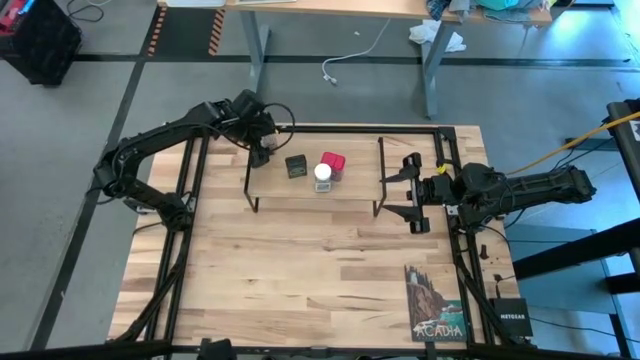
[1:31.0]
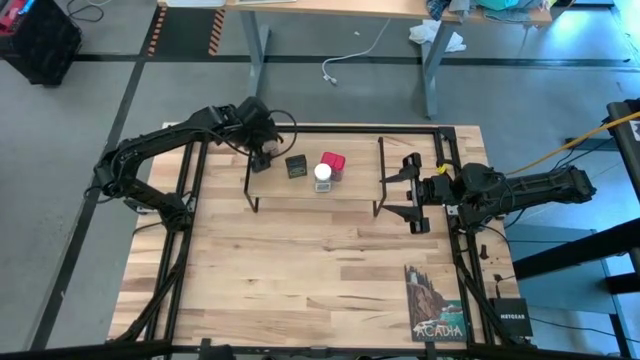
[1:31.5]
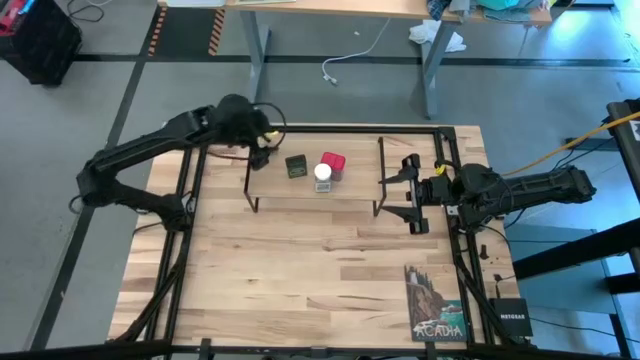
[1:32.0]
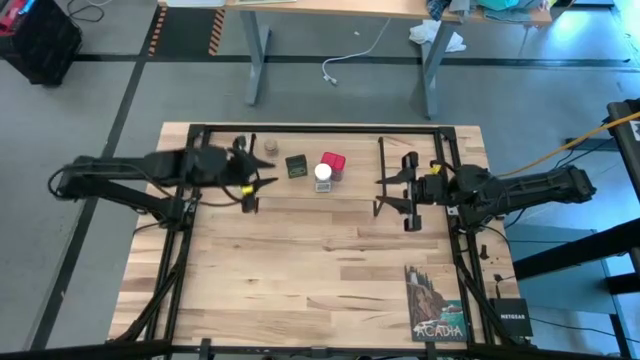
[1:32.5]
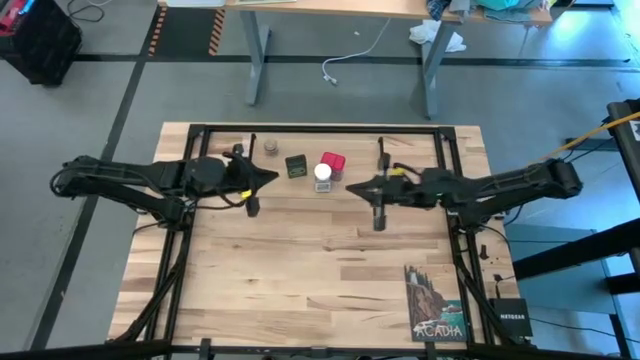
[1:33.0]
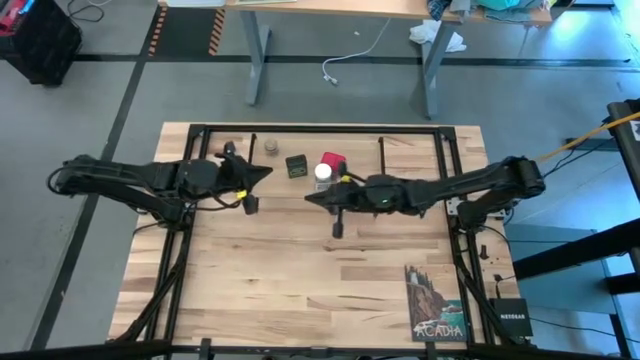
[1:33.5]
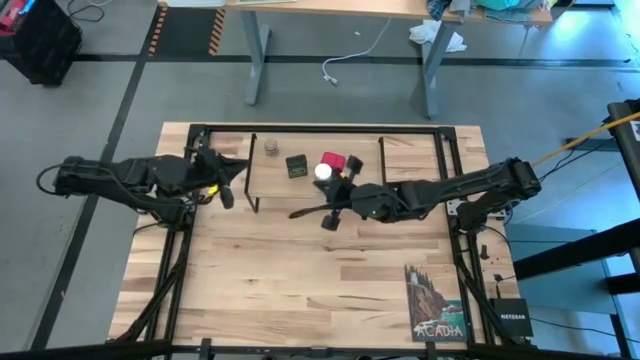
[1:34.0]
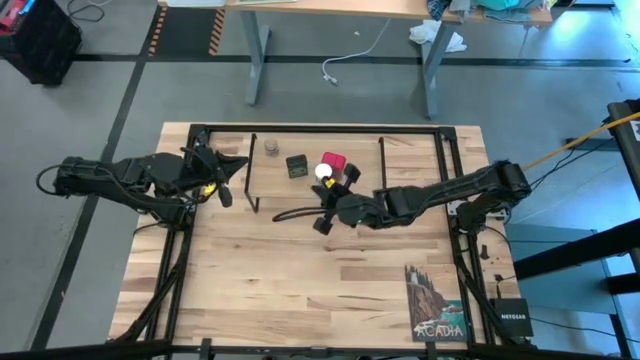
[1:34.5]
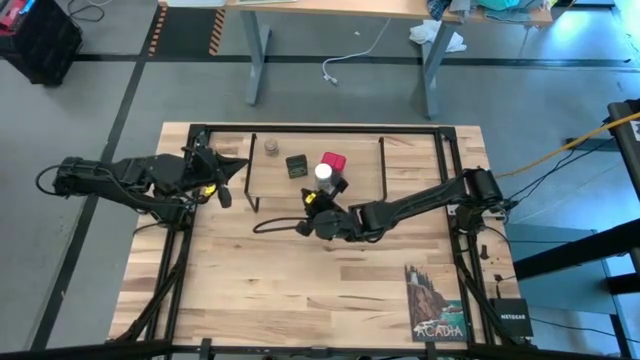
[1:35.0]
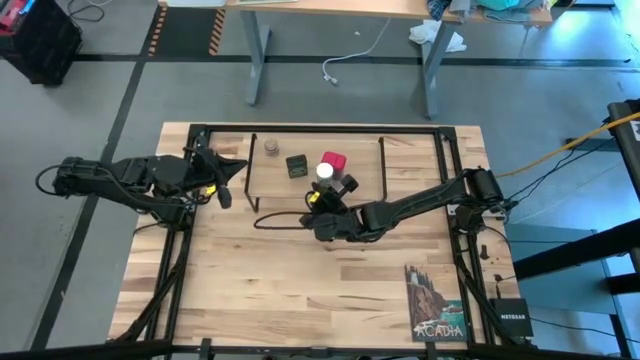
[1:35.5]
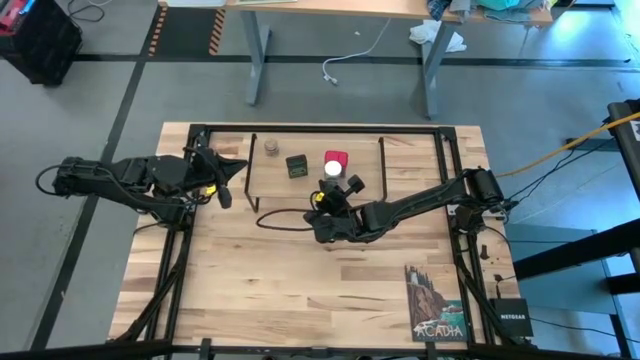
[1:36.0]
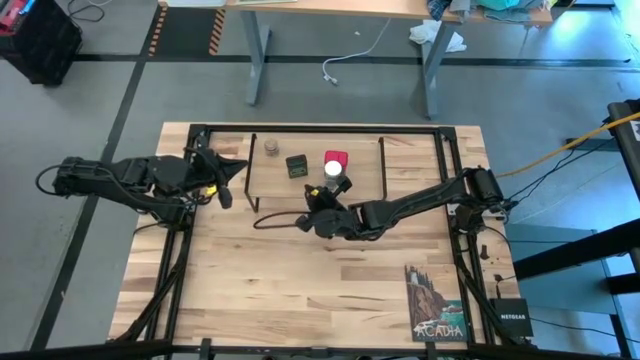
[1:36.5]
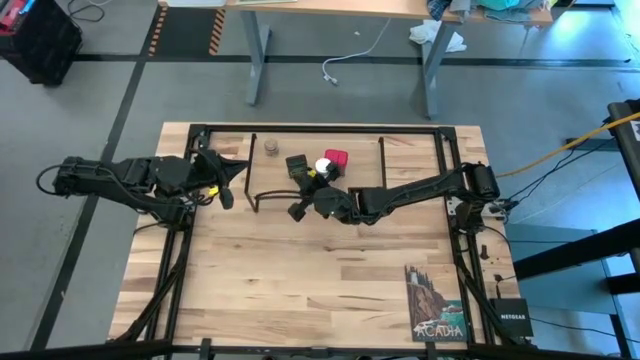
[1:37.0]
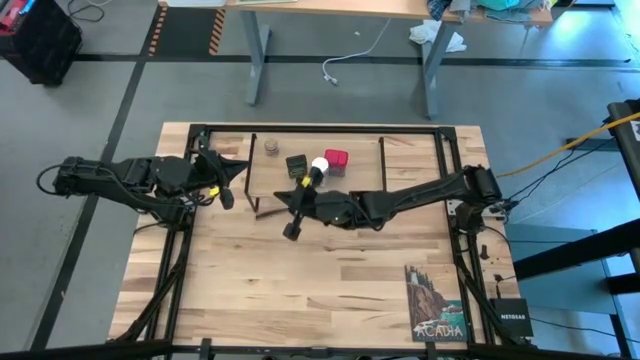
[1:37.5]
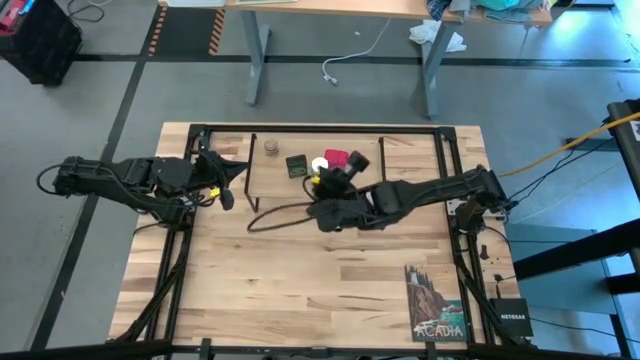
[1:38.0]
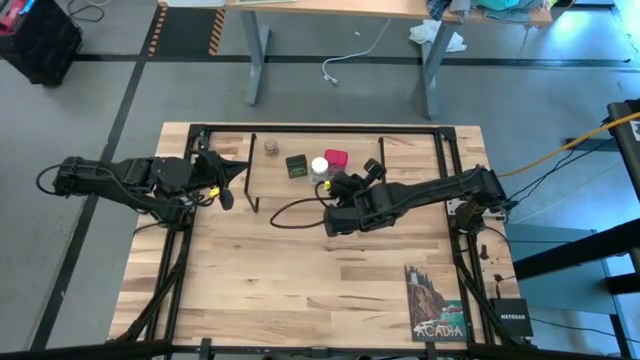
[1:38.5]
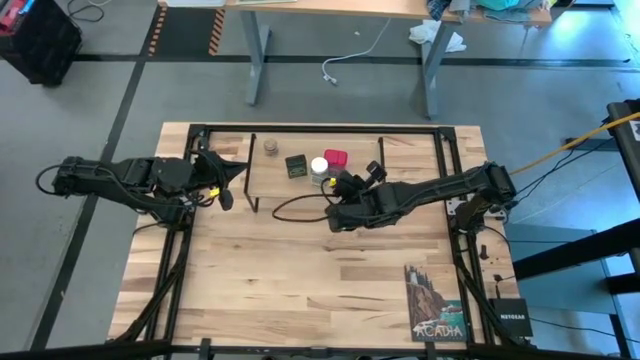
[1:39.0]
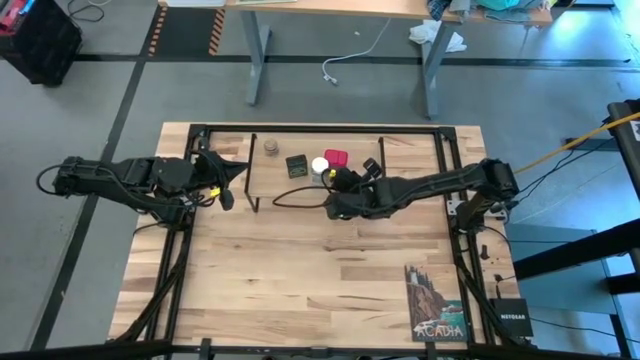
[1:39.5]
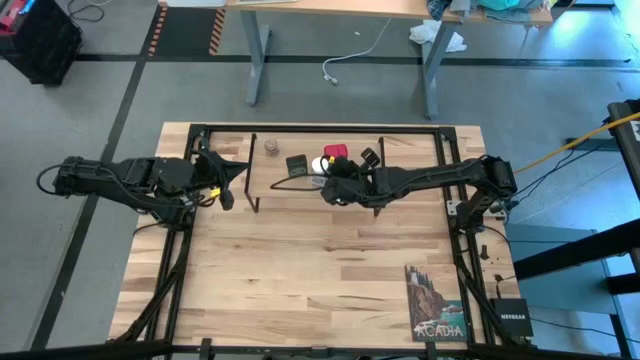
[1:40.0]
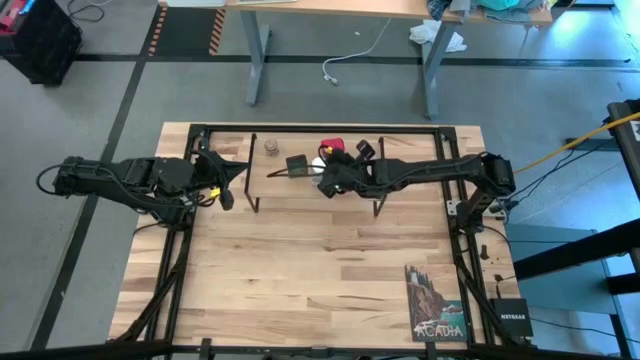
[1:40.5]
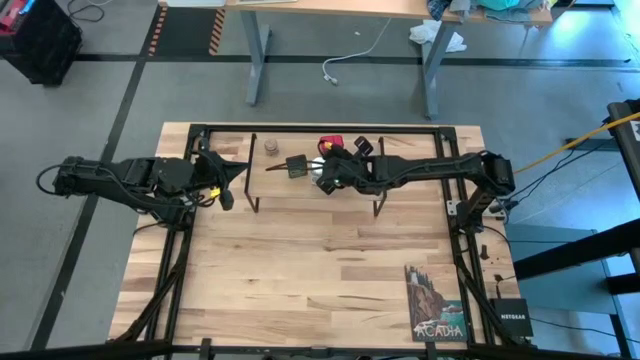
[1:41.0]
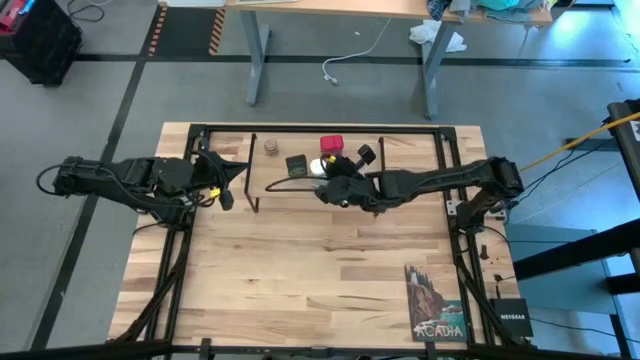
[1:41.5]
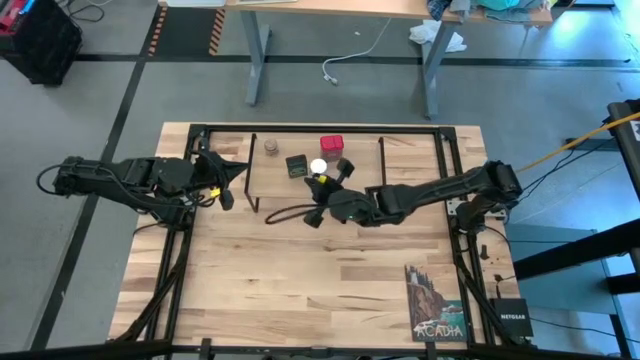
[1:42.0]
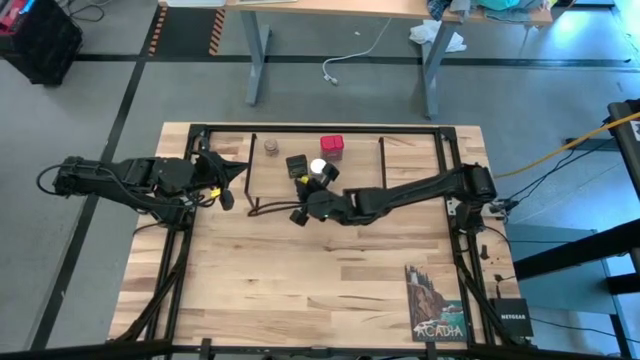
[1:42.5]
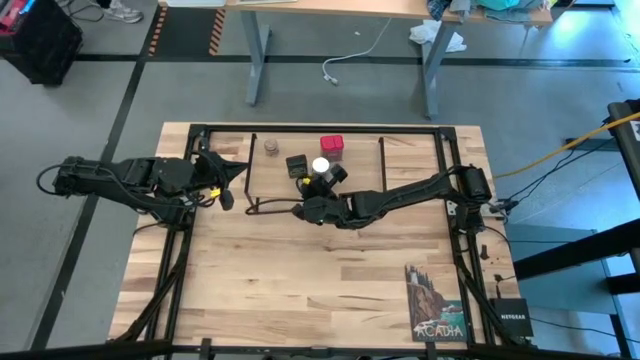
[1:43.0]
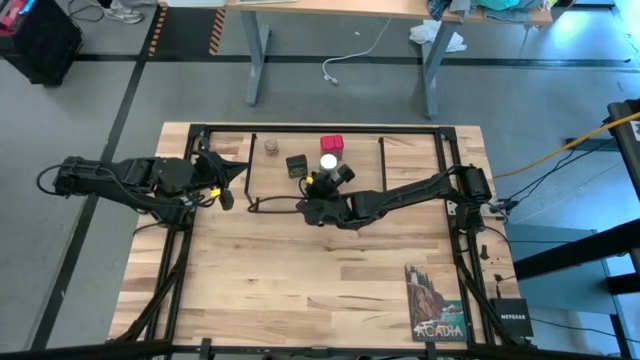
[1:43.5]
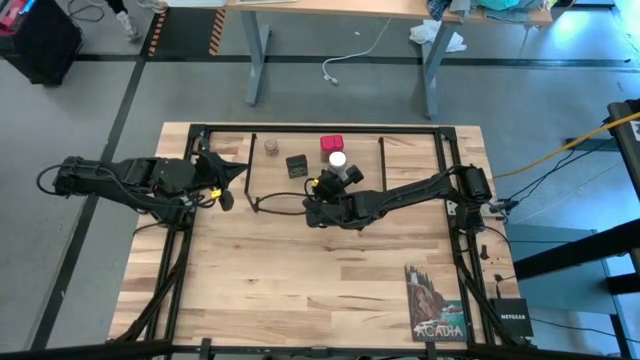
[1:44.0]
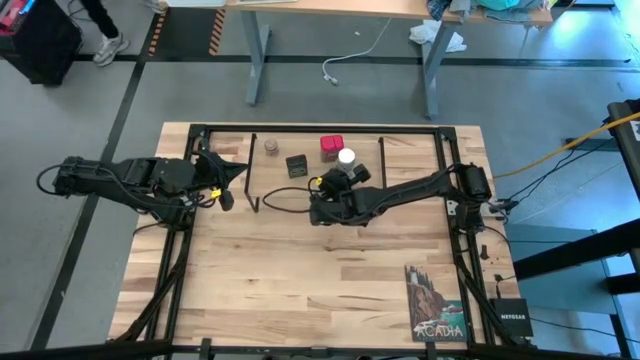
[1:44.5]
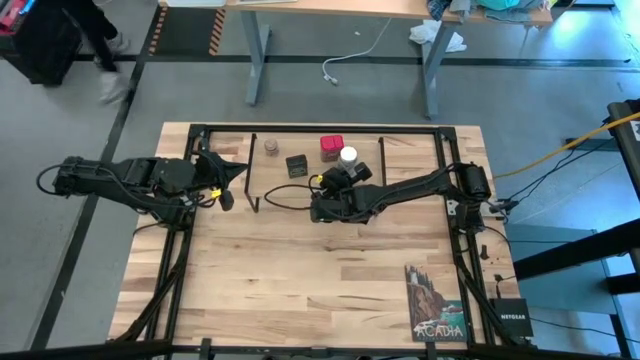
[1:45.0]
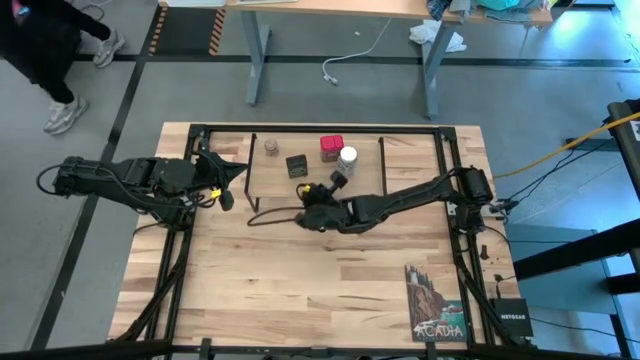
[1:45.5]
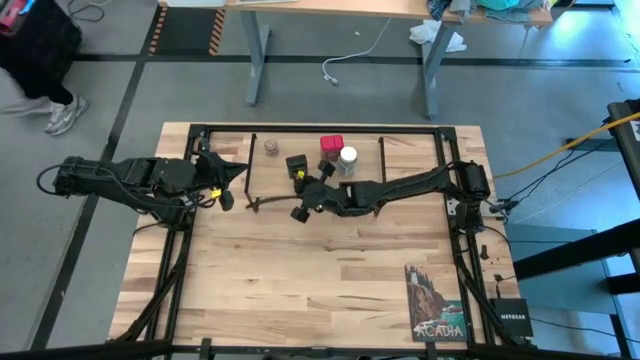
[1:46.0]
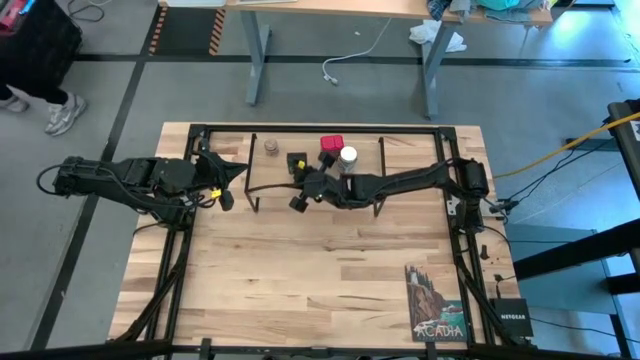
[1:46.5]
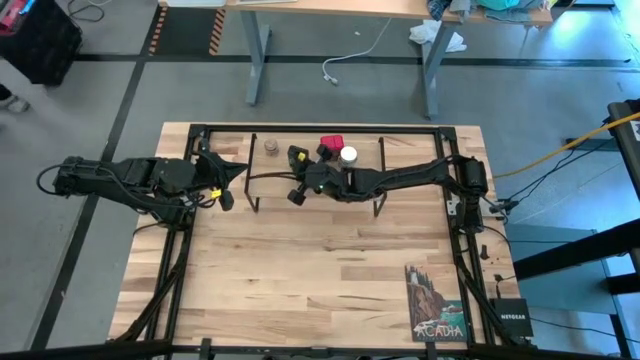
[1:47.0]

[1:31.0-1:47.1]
Task: Shelf spices
Adjust the seasoning bottle and cans on the shelf

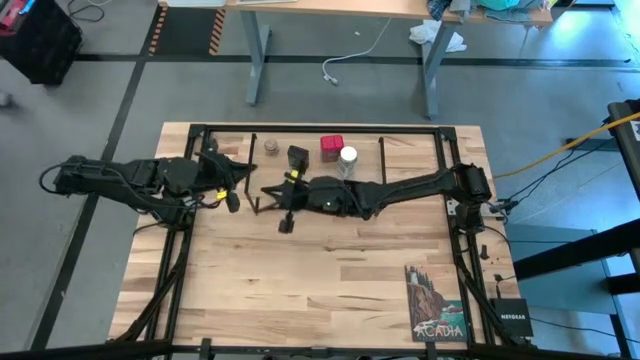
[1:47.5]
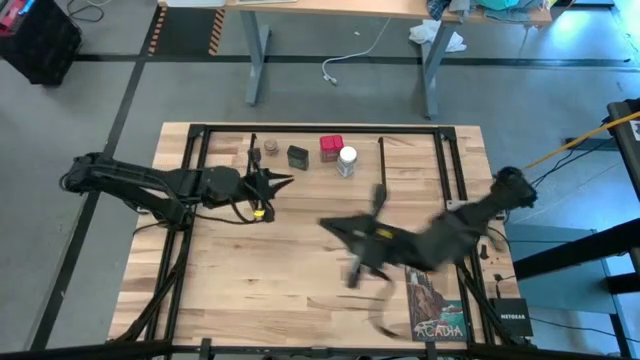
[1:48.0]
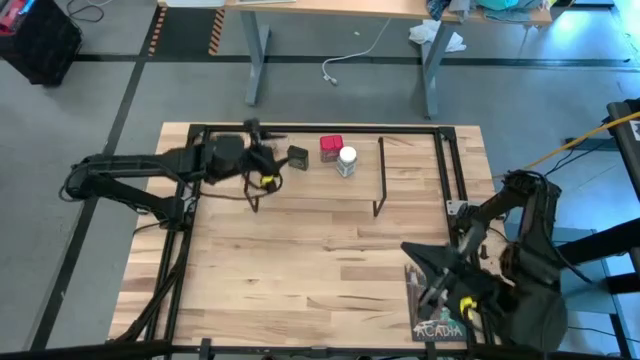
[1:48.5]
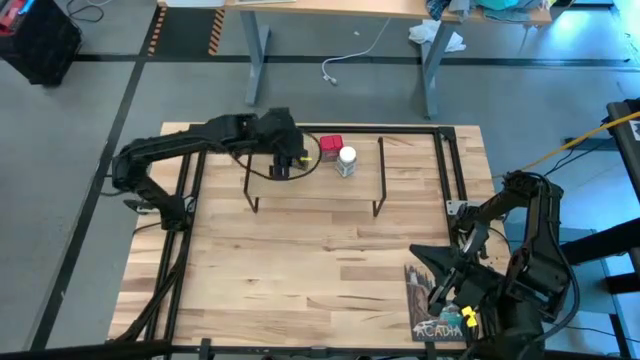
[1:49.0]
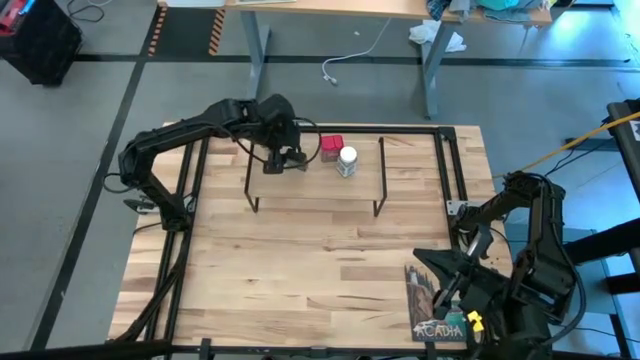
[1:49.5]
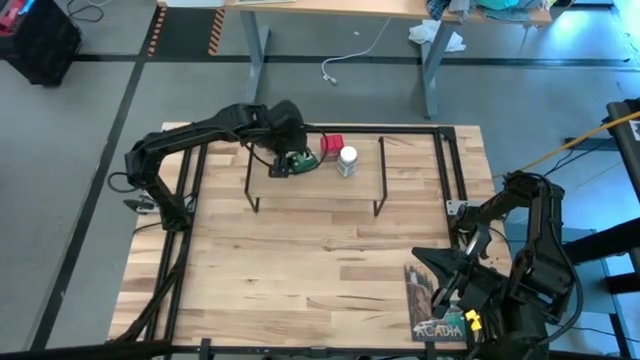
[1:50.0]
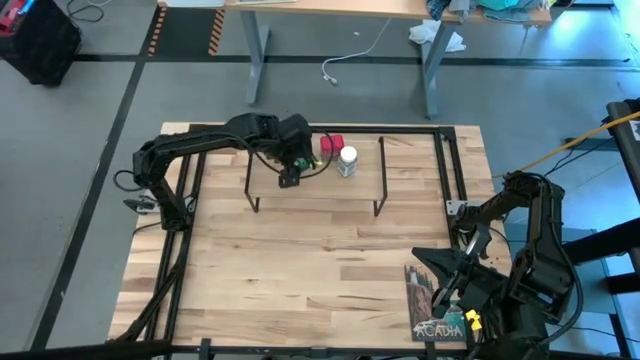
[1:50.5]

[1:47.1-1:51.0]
Adjust the green seasoning can
